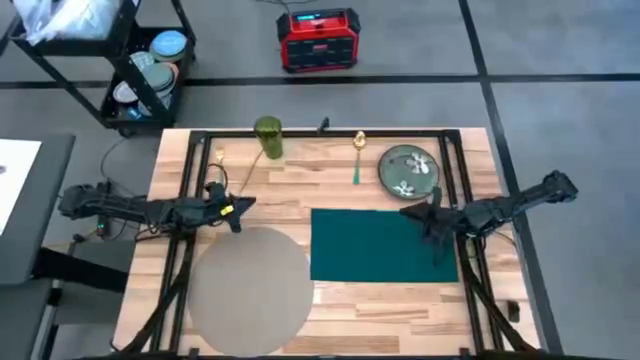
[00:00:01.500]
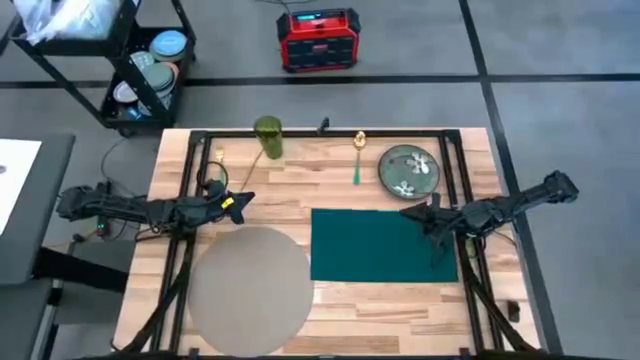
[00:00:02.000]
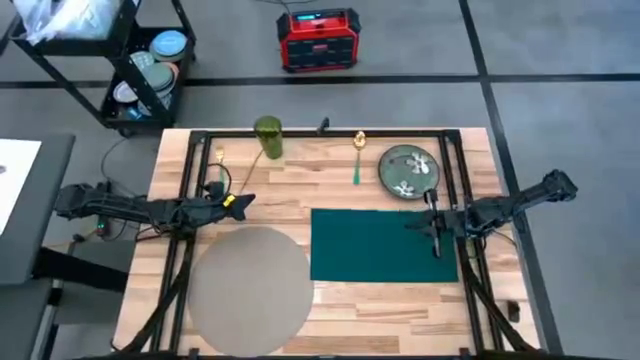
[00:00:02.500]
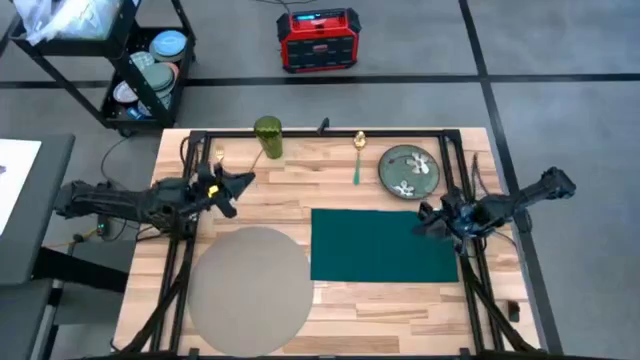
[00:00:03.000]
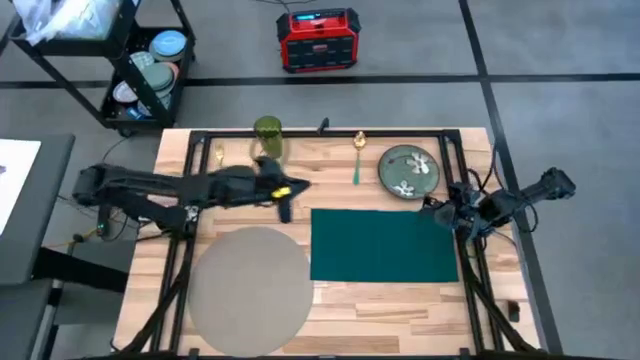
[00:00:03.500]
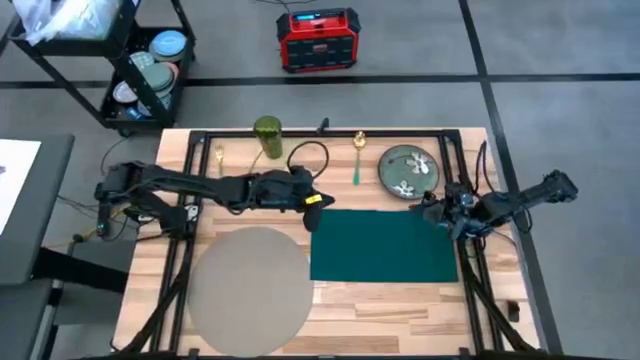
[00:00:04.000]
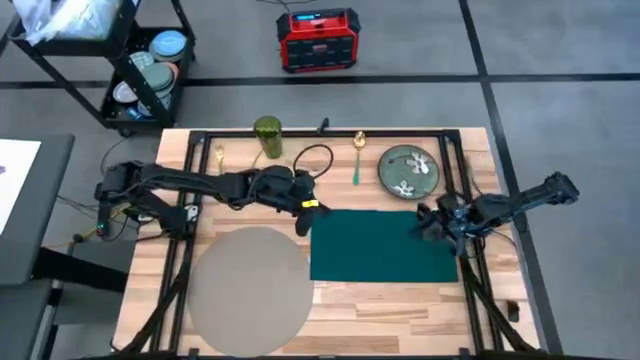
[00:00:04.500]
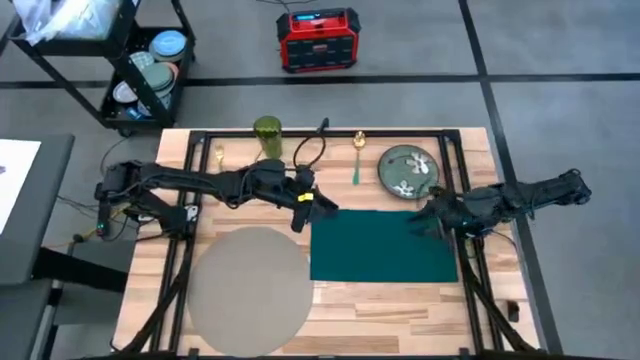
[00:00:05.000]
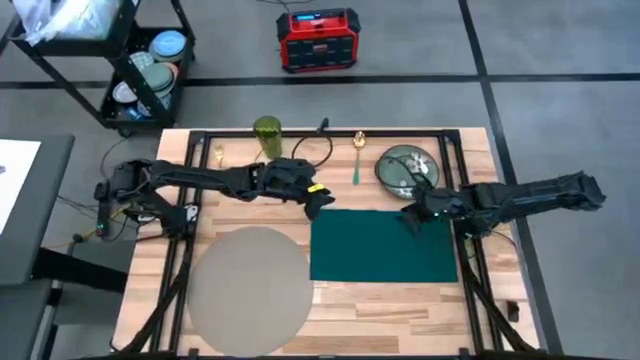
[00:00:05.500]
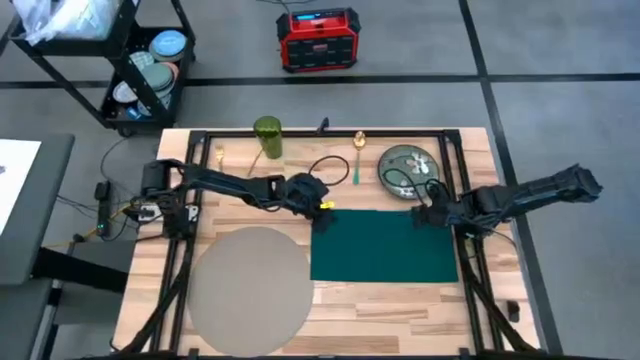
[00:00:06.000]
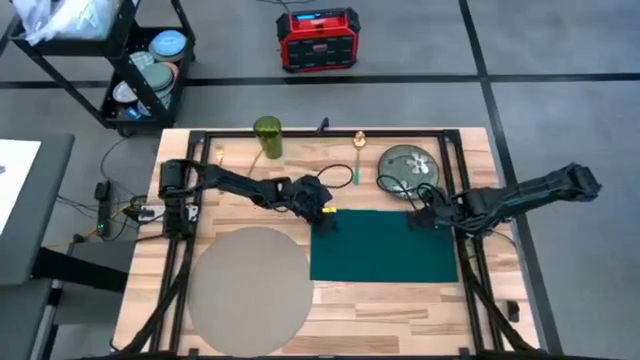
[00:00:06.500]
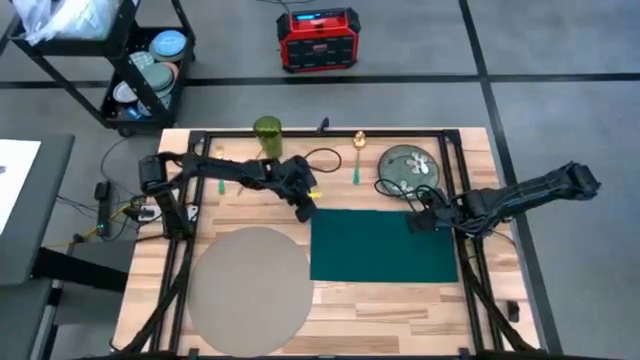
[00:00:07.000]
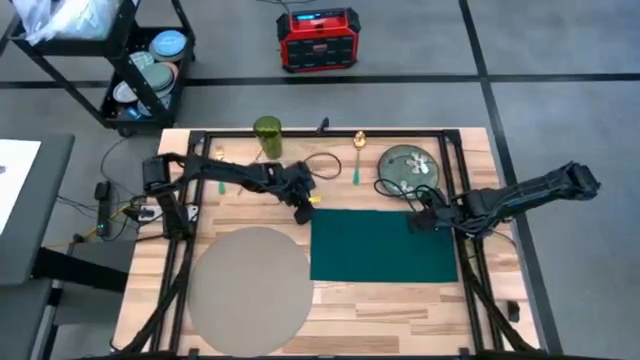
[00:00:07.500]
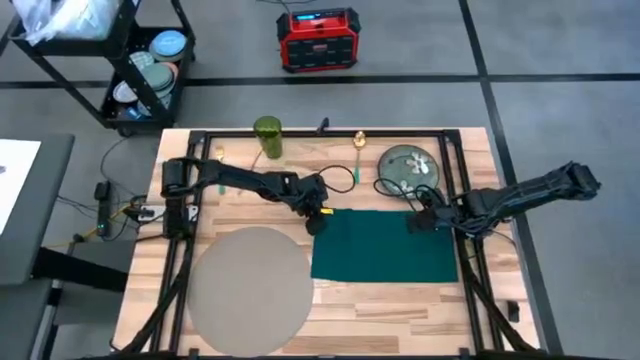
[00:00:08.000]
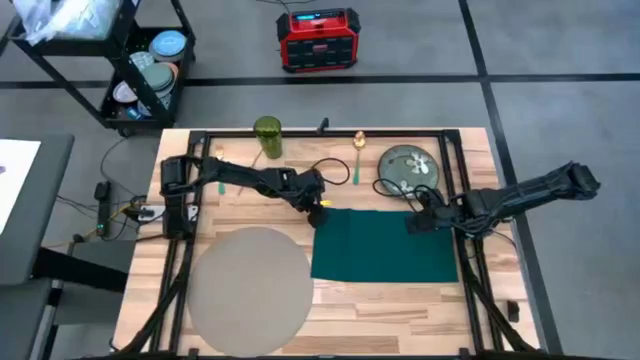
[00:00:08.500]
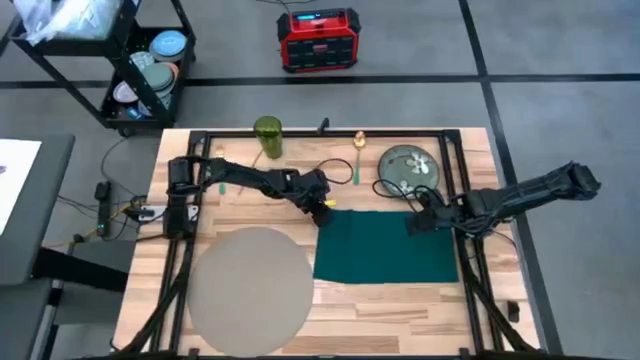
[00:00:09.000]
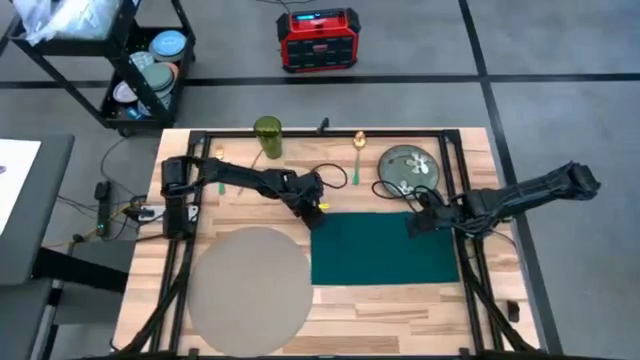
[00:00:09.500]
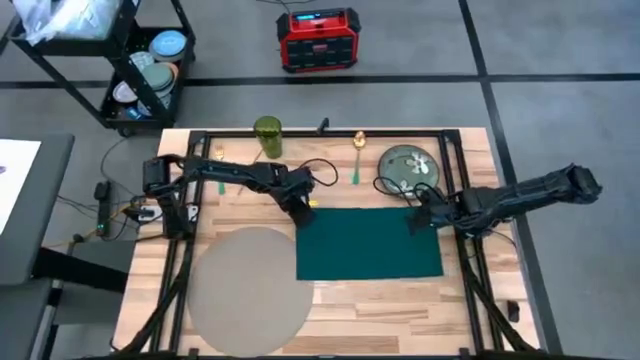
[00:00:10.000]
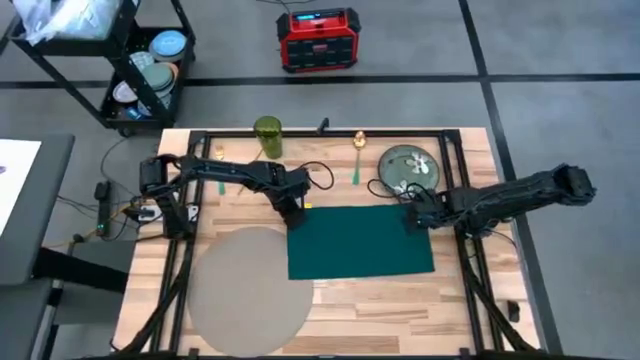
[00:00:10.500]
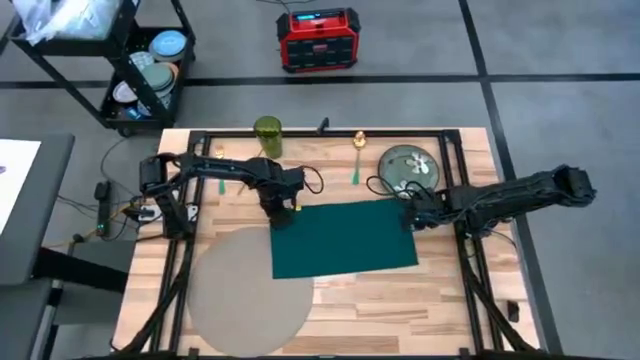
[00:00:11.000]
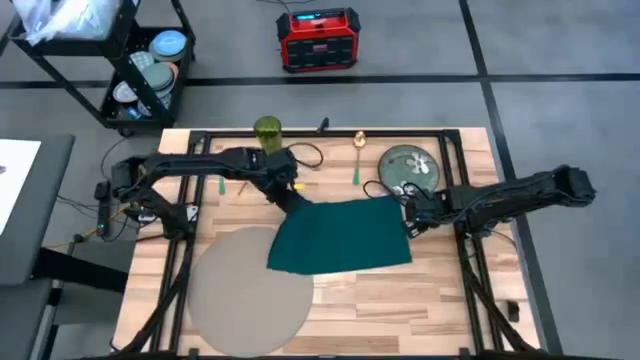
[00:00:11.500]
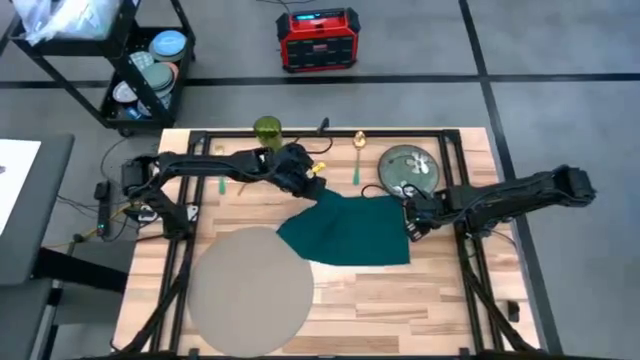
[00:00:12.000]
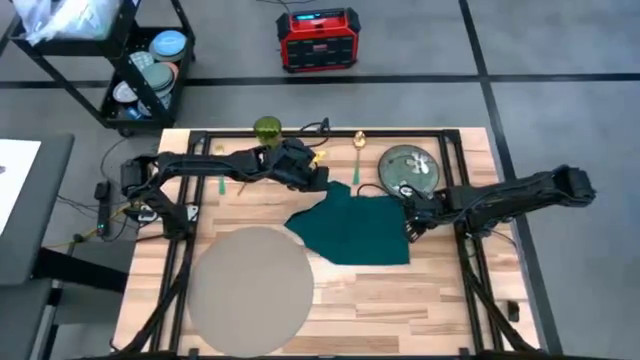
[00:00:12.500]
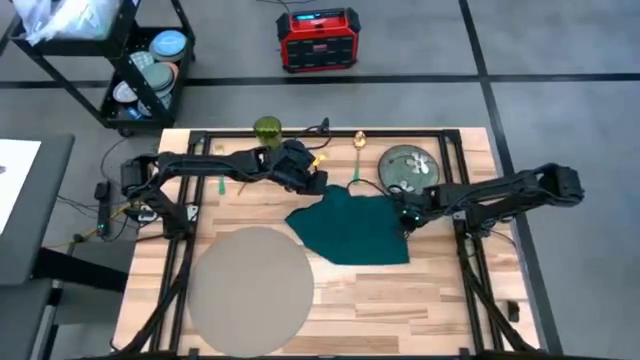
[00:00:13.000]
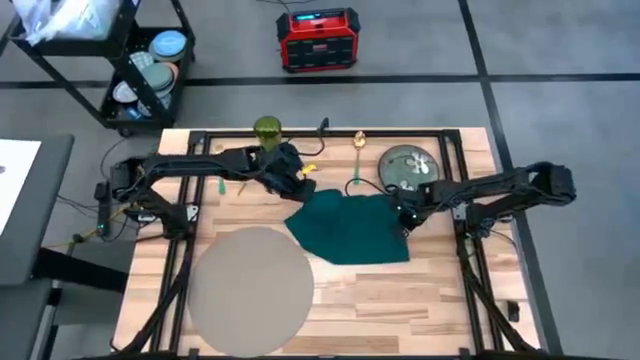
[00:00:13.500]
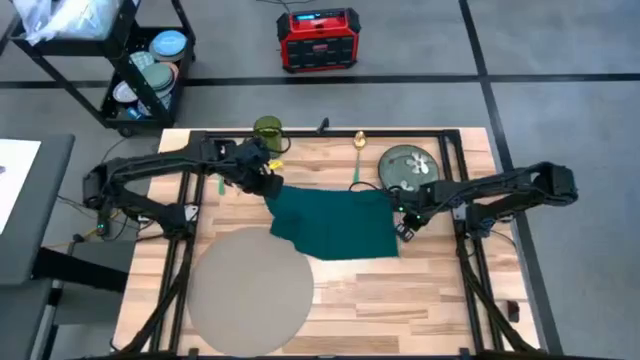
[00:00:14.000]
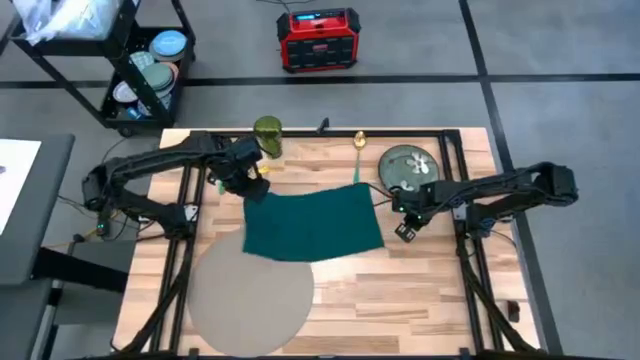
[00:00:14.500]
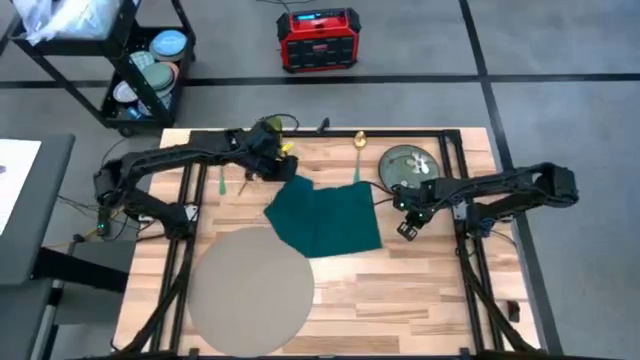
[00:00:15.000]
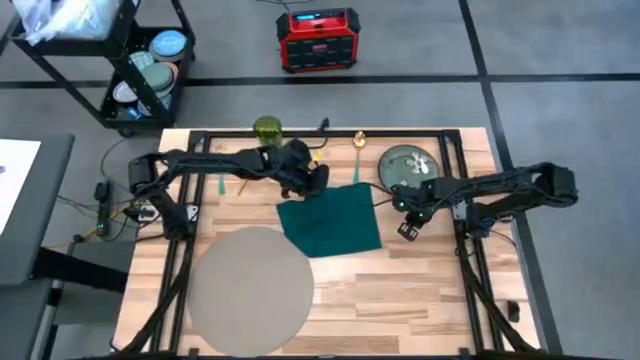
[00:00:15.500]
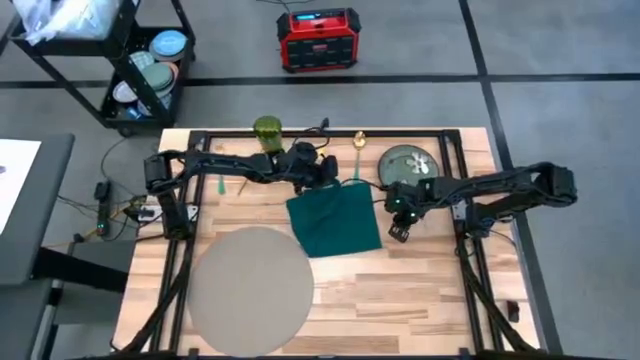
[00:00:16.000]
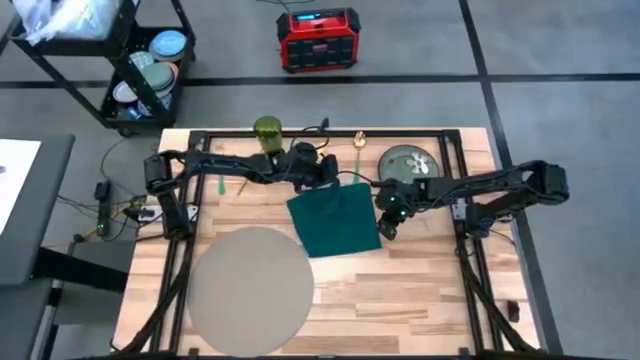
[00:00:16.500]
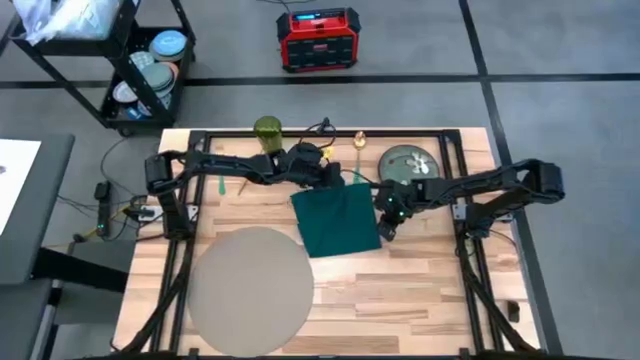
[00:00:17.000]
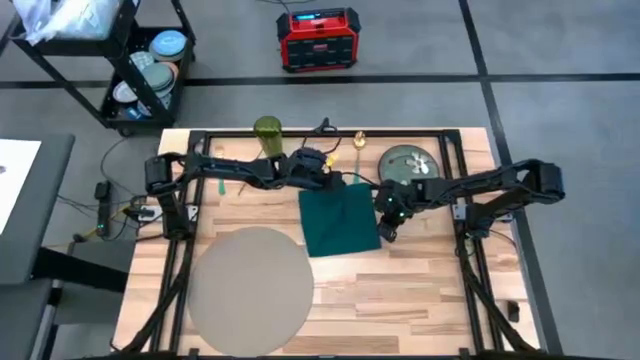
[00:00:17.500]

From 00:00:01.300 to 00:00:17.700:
Task: Set table place
Fold the green napkin

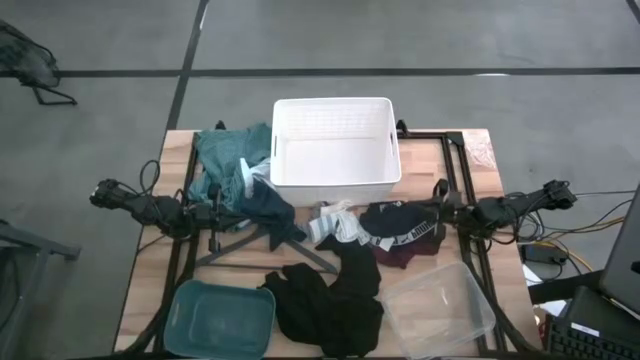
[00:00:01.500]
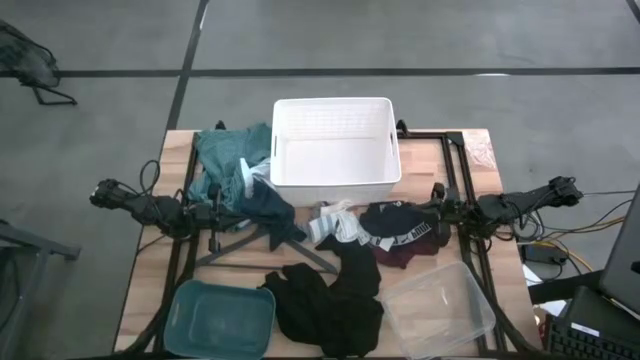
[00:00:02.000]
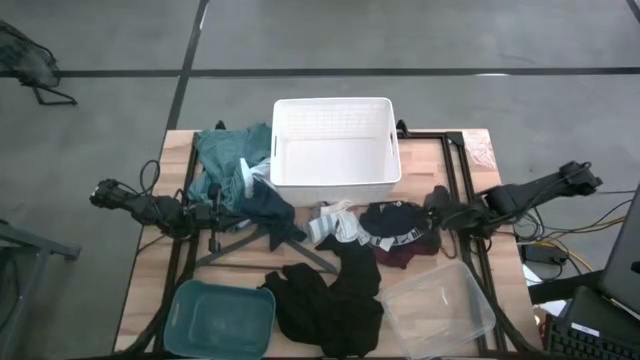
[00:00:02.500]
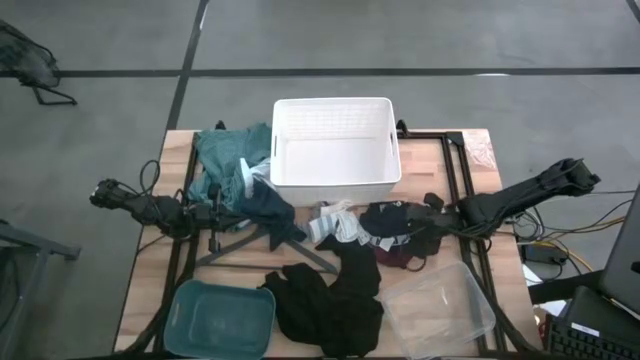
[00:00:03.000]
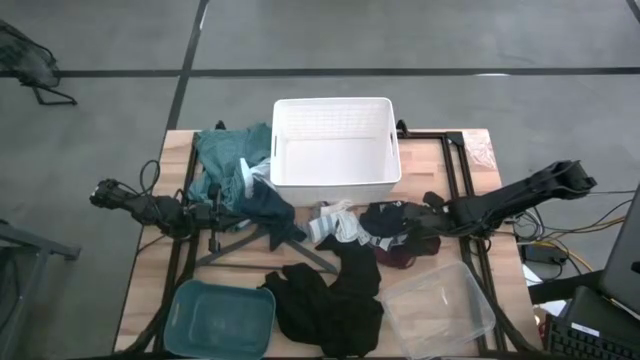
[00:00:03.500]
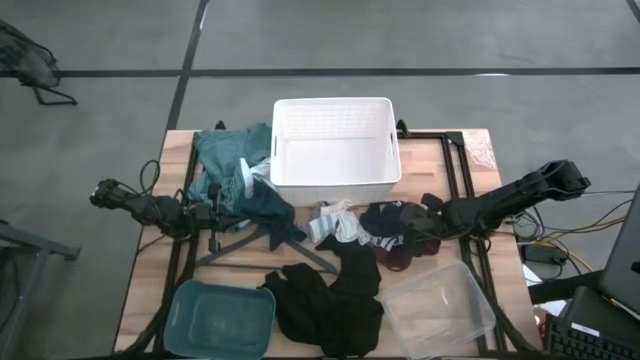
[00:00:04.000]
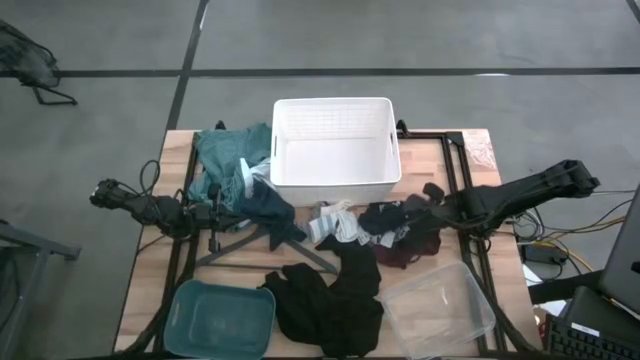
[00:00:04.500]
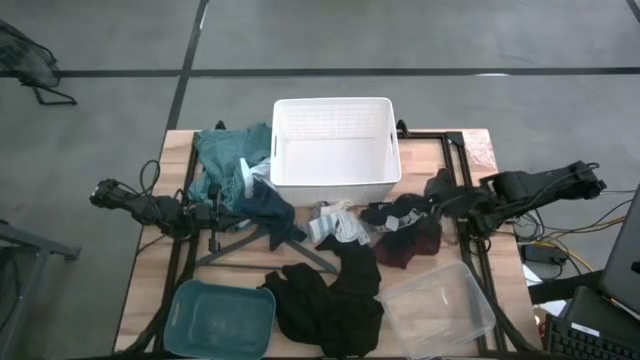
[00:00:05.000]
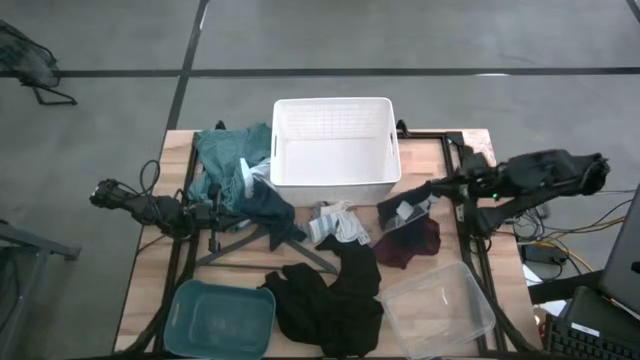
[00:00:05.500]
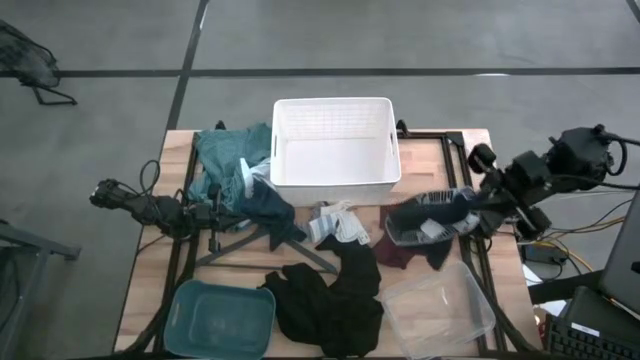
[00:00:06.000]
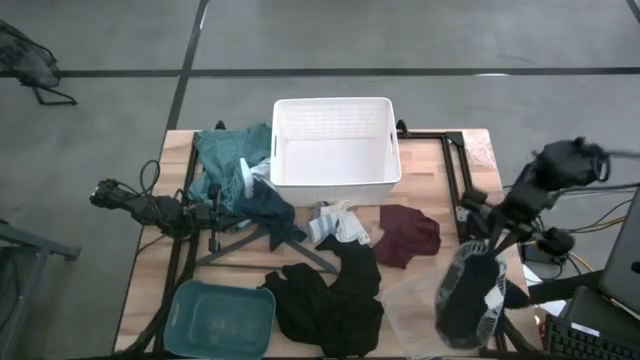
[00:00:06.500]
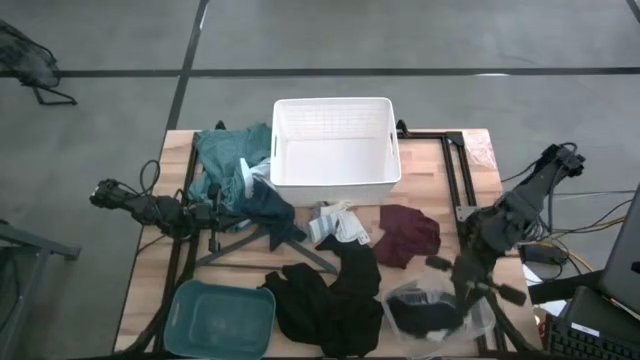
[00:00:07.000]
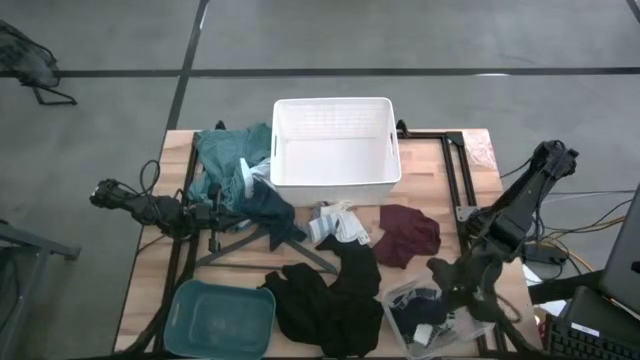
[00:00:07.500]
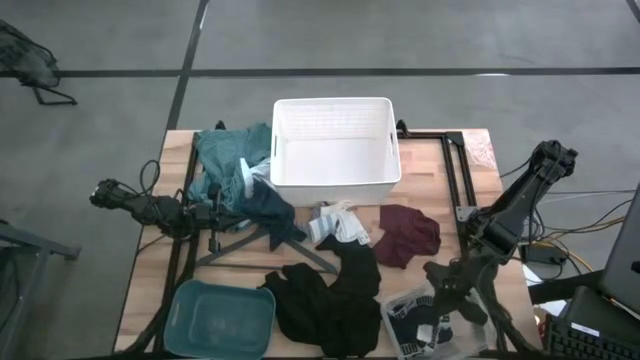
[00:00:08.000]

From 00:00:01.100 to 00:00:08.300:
Task: Pick & Place Cloths
Put the blue boxer shorts into the transparent bin
